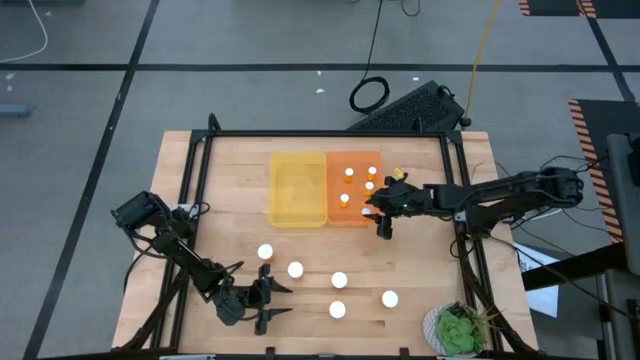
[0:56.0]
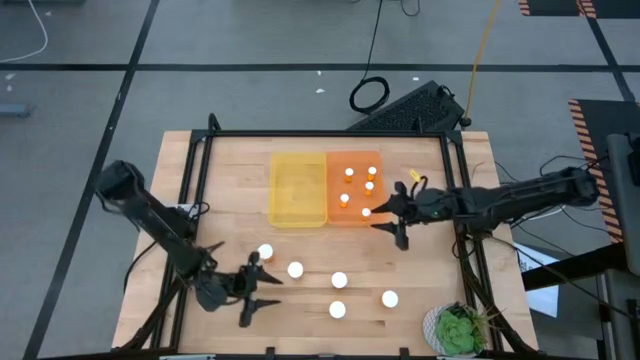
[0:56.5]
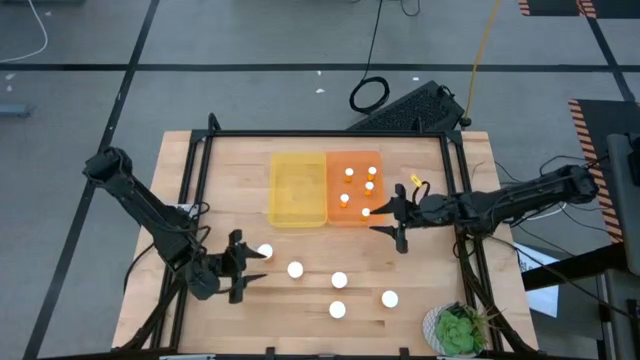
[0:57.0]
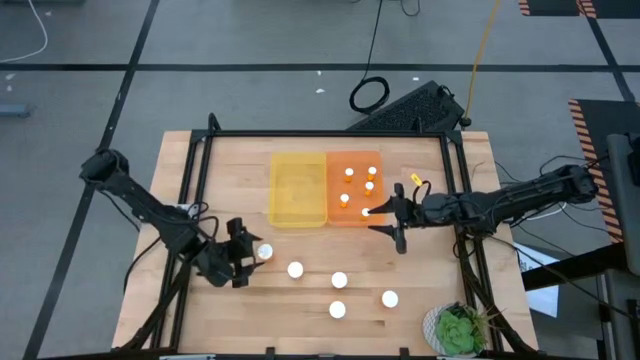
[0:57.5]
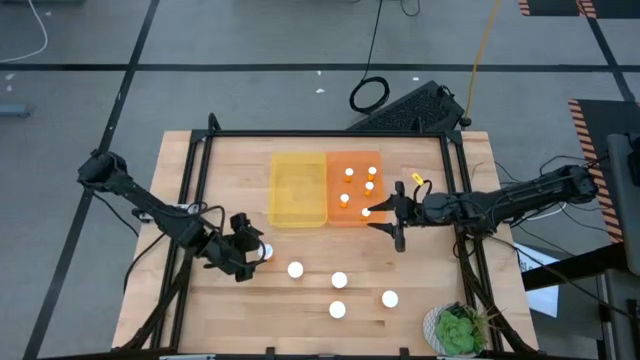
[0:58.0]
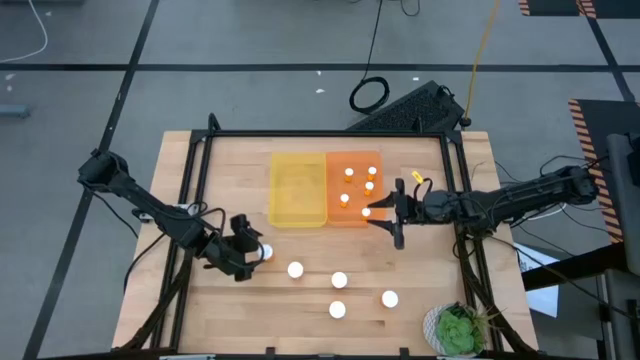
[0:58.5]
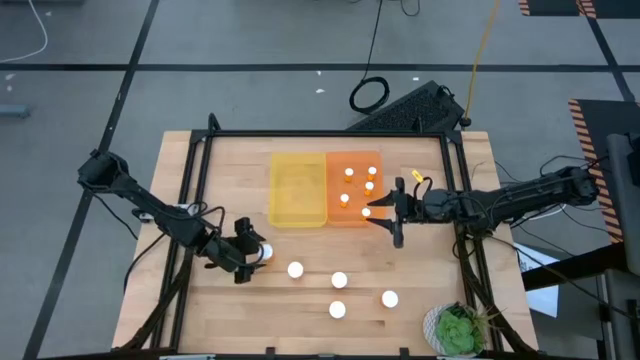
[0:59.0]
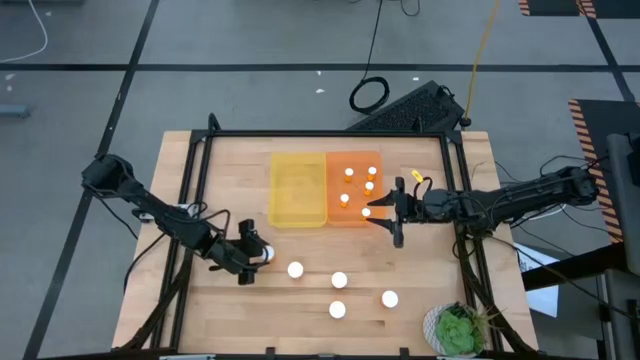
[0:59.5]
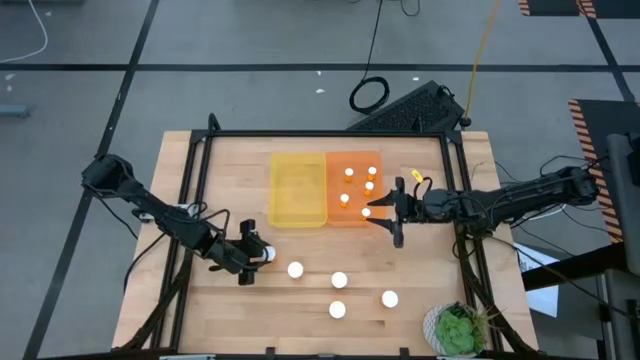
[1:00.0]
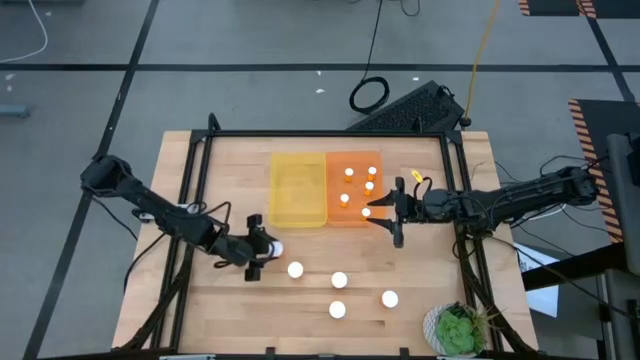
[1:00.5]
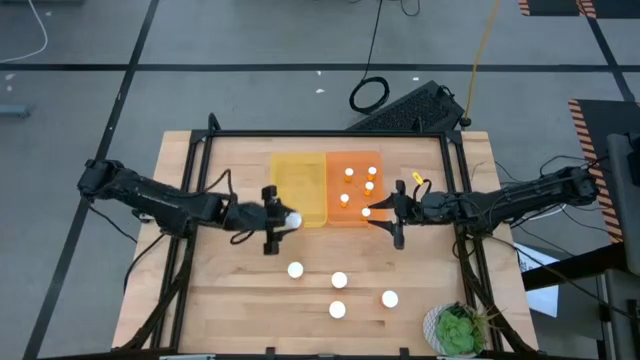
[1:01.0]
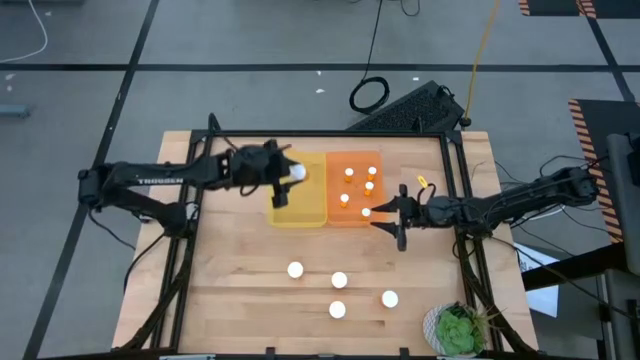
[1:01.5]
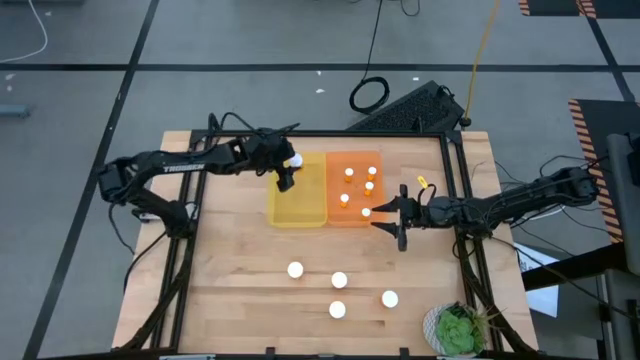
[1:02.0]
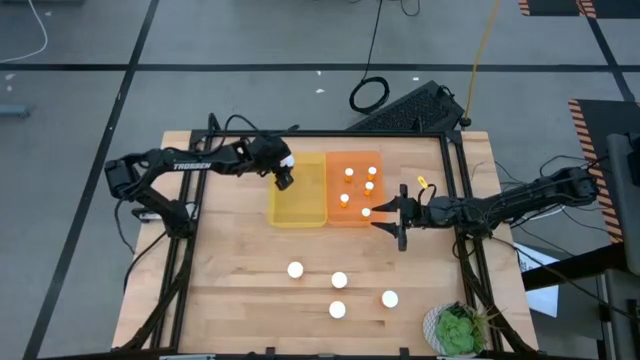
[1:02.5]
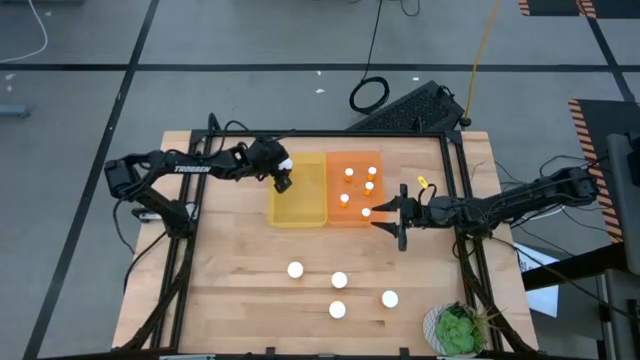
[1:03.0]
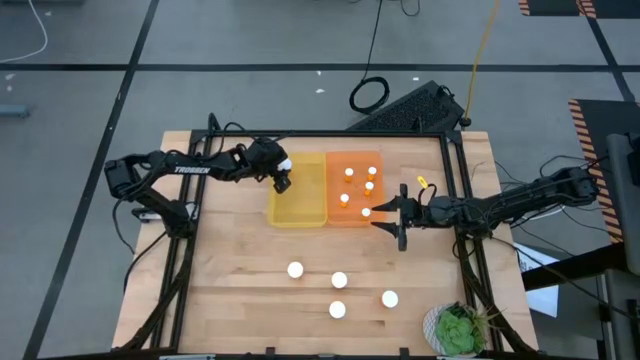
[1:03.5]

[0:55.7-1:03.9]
Task: Pick and place medicine bottles into bin by pill shape (circle, oval)
Put the large orange pill bottle into the yellow bin

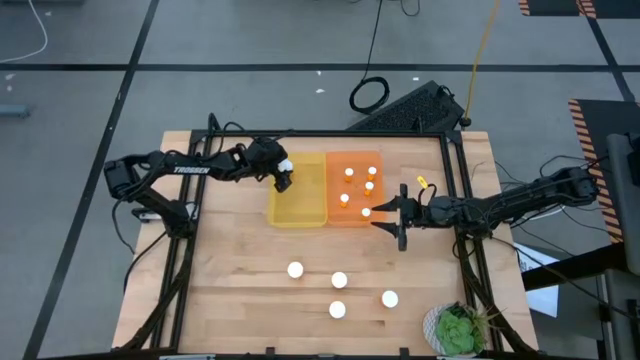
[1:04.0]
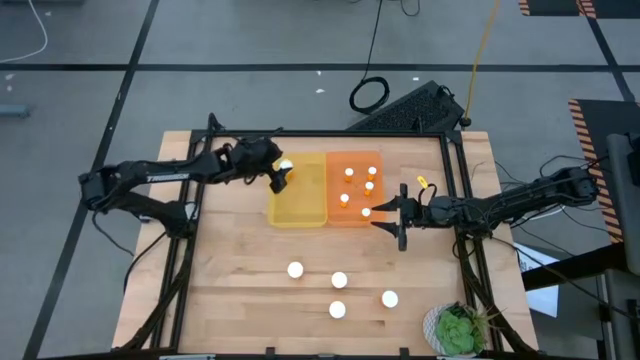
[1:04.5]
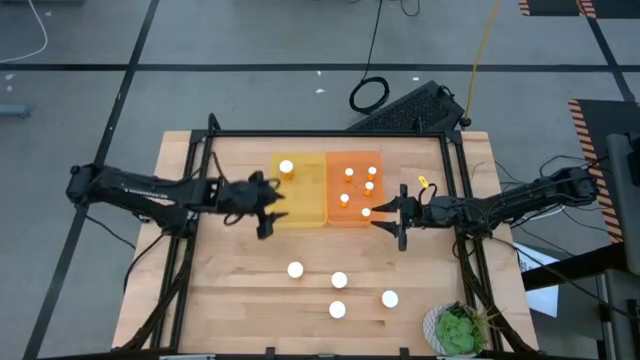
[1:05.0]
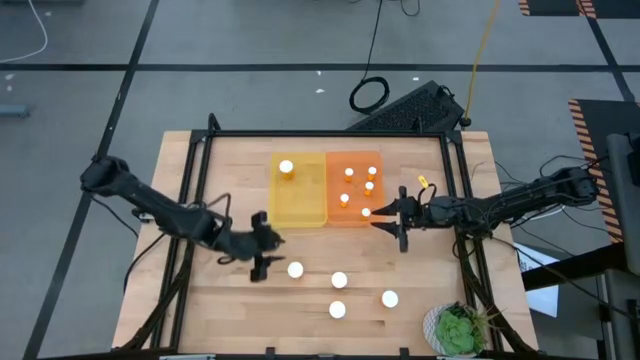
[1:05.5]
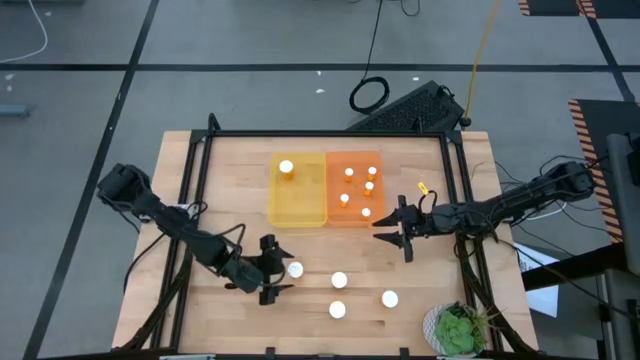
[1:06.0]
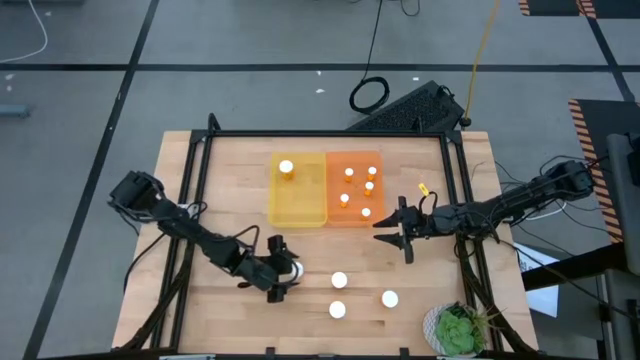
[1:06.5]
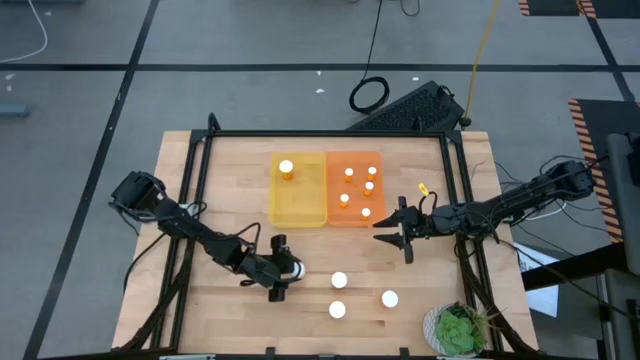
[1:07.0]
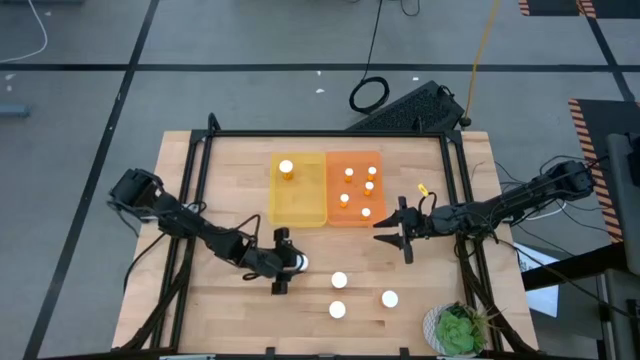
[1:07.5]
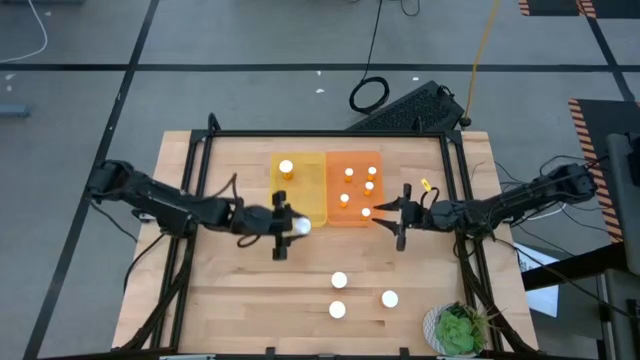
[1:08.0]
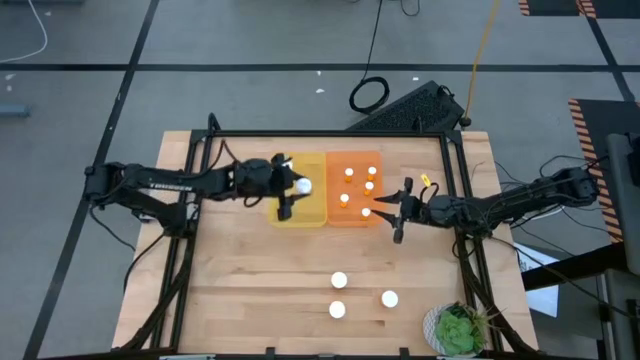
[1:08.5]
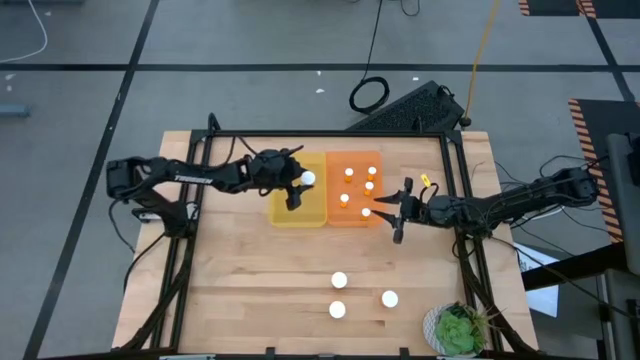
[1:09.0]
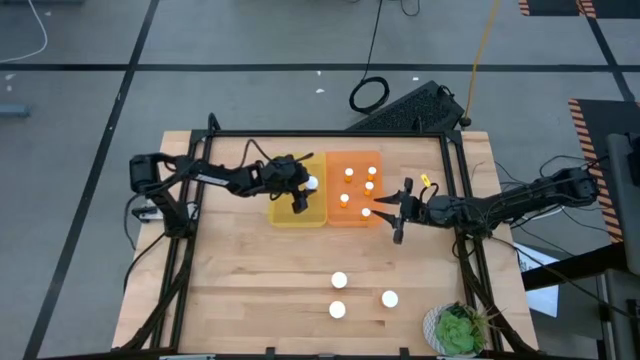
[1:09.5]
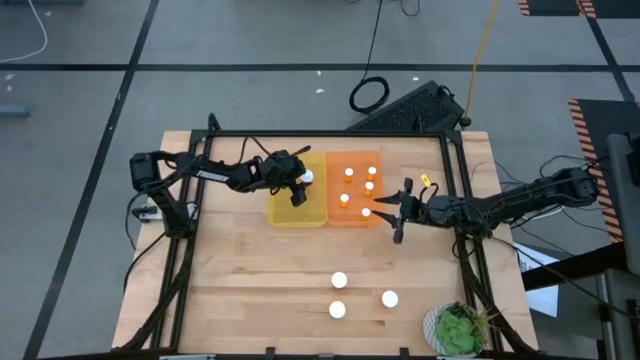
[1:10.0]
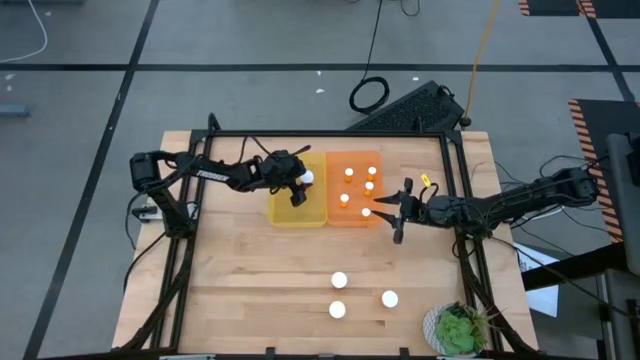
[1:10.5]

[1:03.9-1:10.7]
Put the large orange pill bottle into the yellow bin

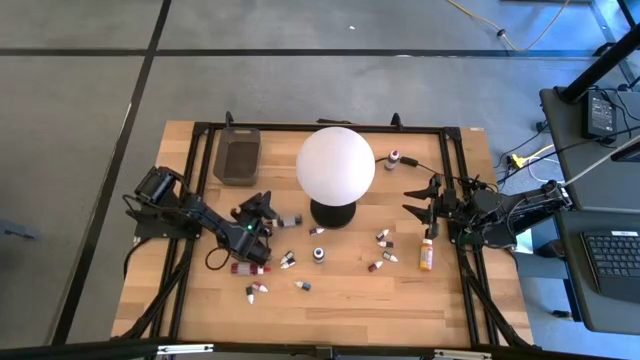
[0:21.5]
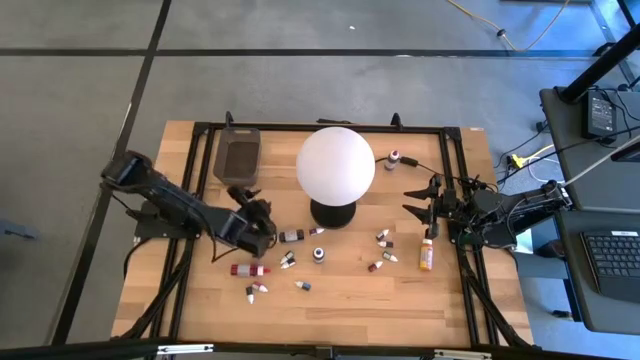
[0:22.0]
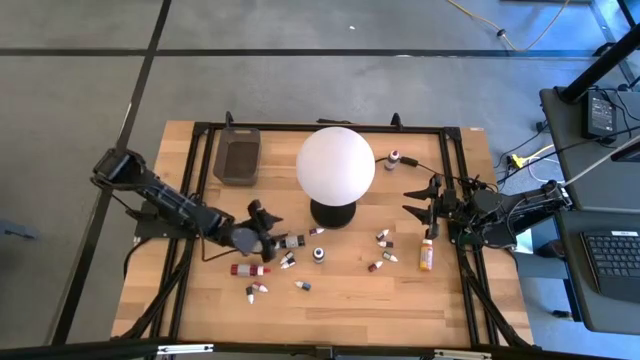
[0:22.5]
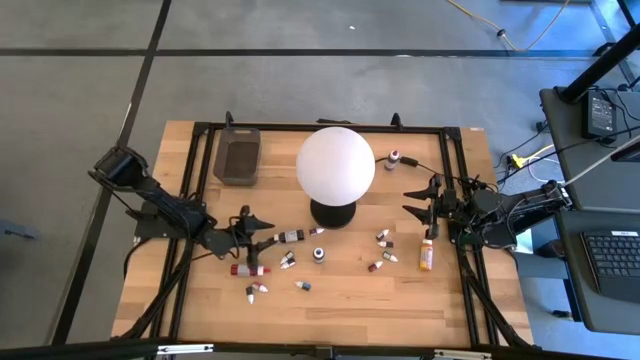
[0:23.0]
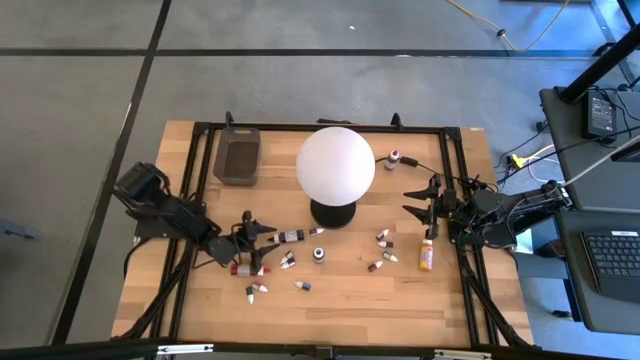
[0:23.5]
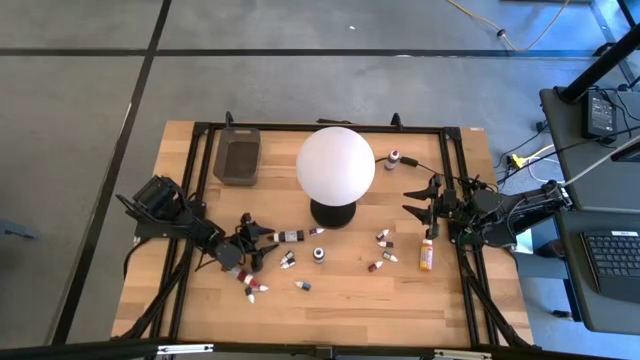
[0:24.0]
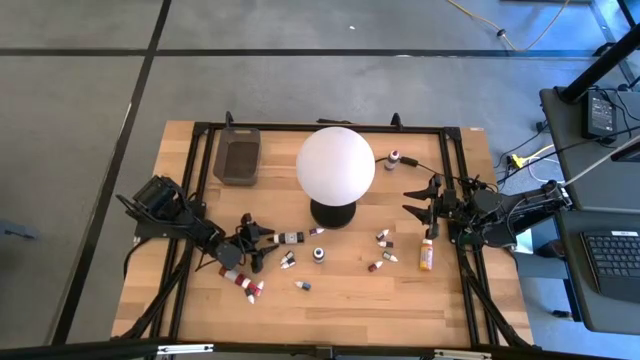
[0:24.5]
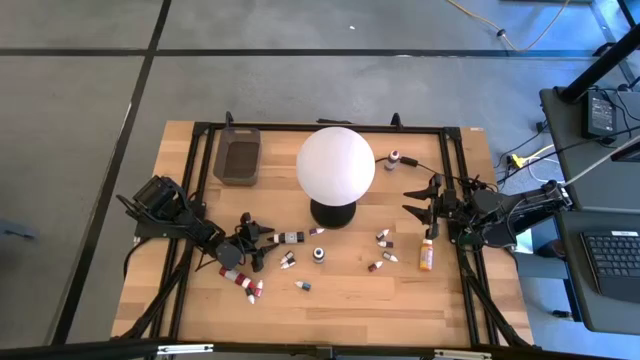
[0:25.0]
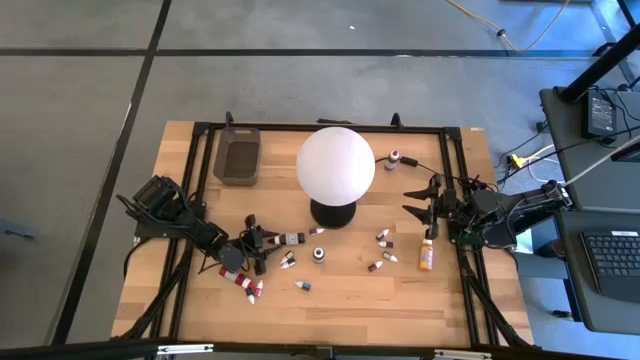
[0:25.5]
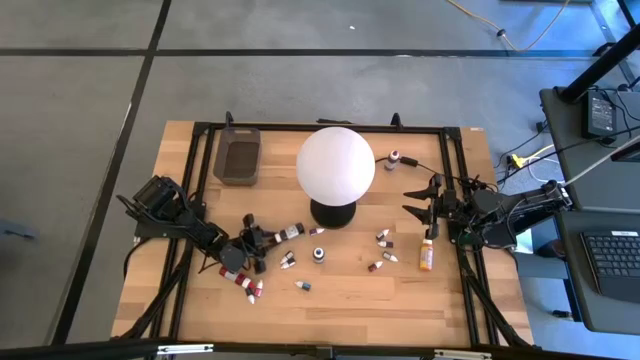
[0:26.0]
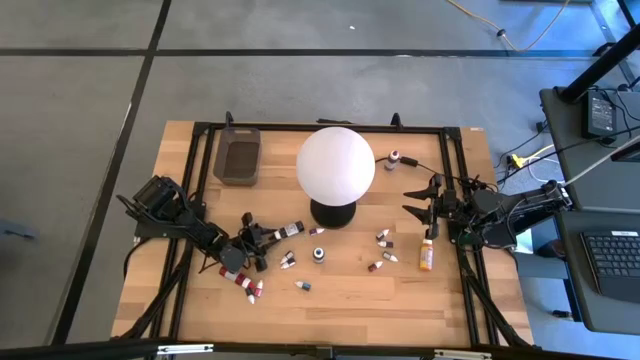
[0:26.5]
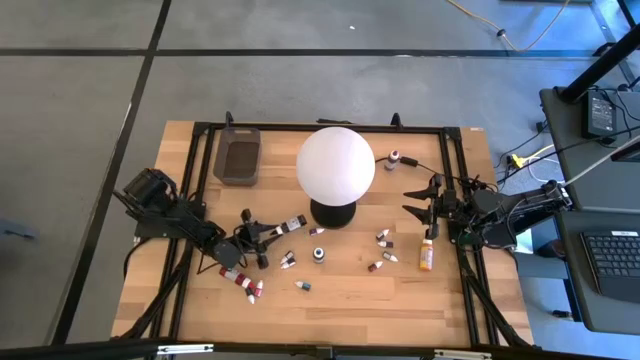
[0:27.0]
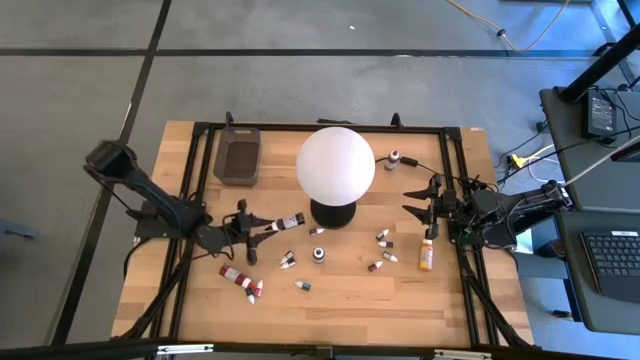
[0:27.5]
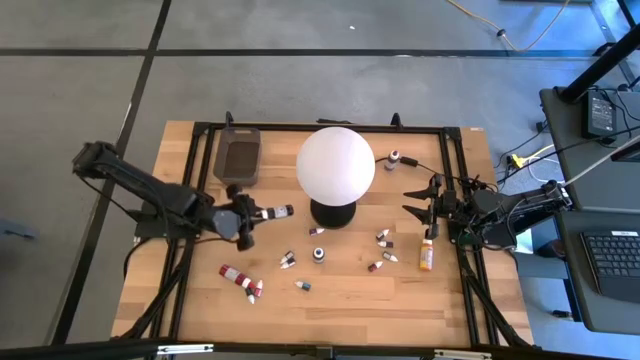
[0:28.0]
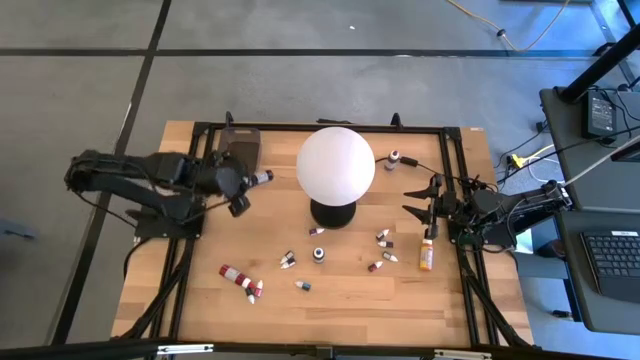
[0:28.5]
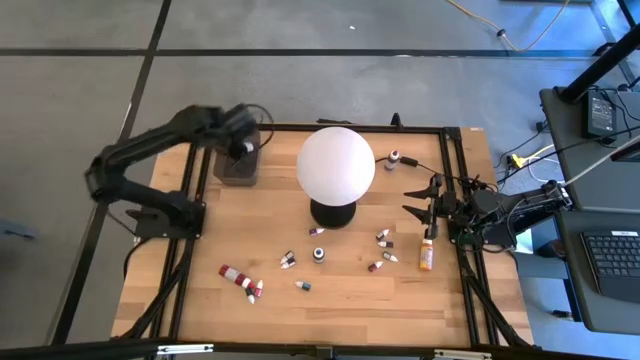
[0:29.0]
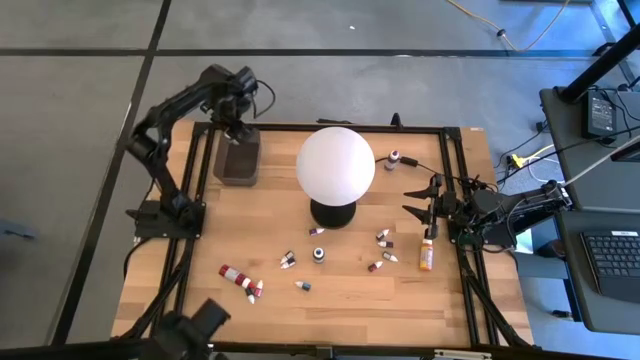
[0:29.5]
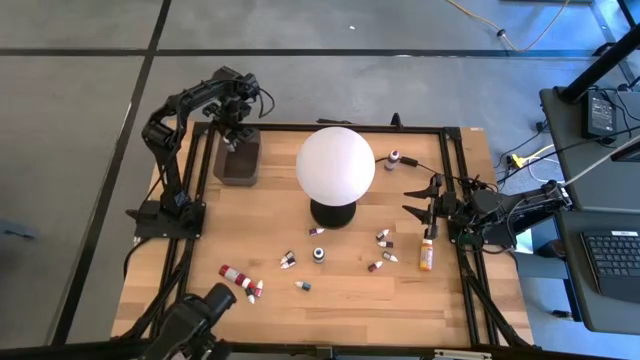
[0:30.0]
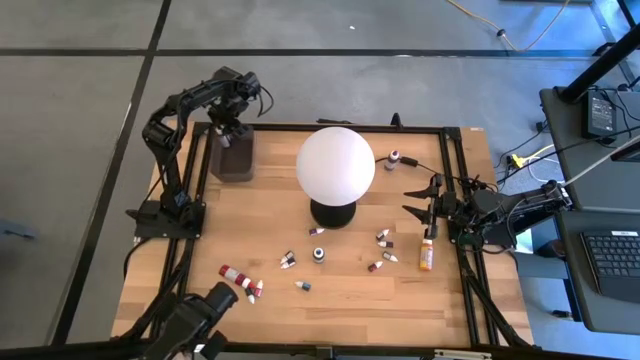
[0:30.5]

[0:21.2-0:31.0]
Task: Pick & Place food coloring
Put the big black food coloring bottle into the black container
